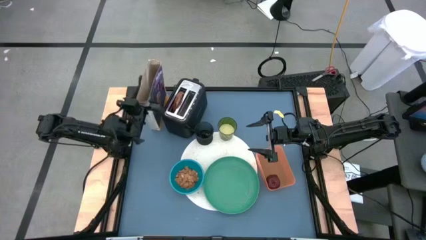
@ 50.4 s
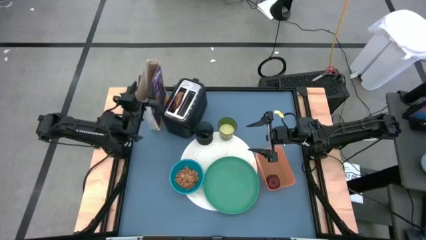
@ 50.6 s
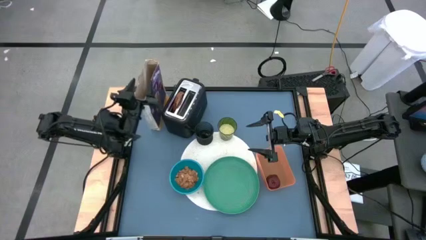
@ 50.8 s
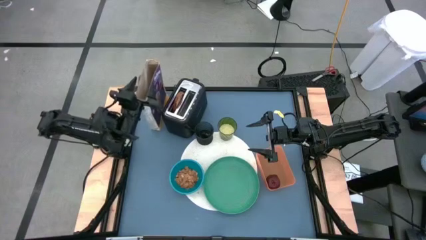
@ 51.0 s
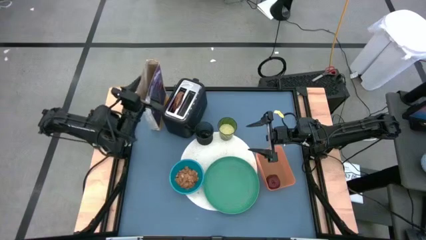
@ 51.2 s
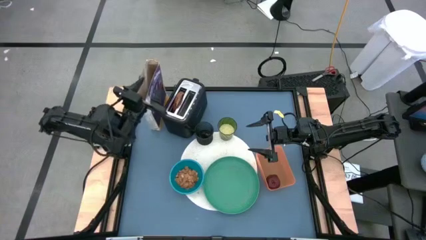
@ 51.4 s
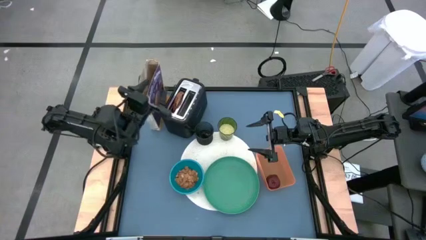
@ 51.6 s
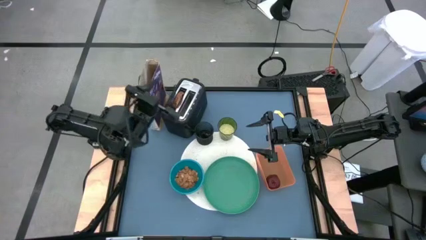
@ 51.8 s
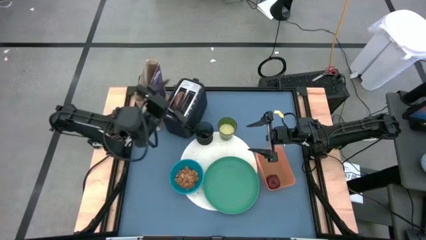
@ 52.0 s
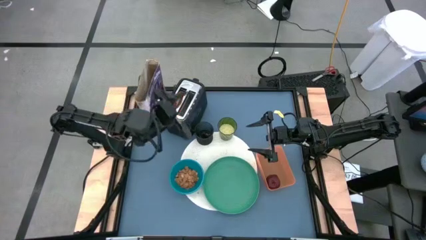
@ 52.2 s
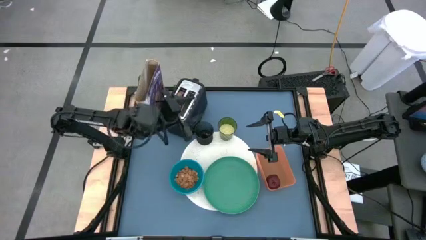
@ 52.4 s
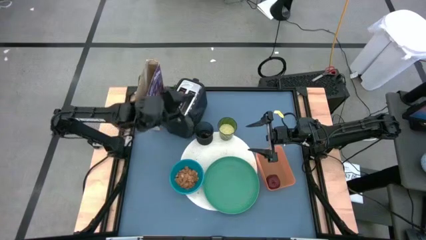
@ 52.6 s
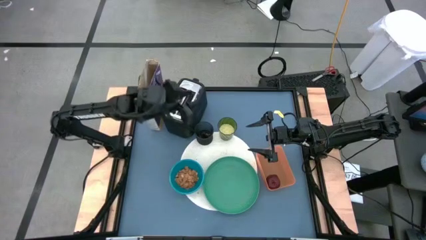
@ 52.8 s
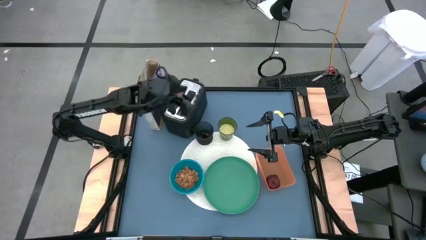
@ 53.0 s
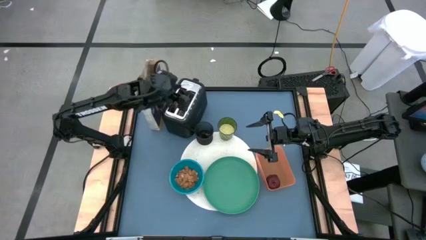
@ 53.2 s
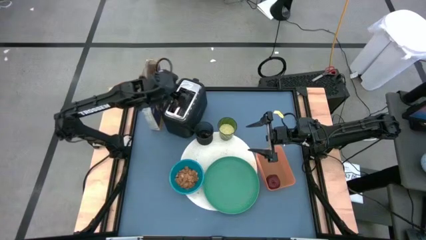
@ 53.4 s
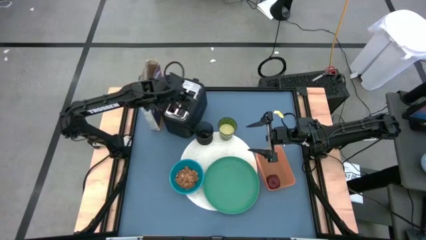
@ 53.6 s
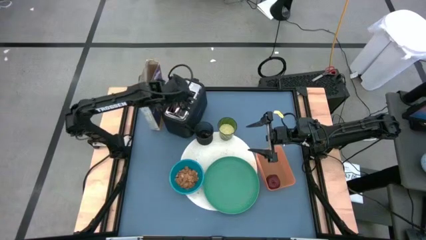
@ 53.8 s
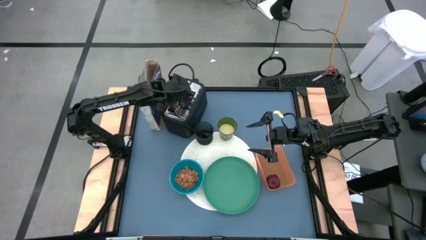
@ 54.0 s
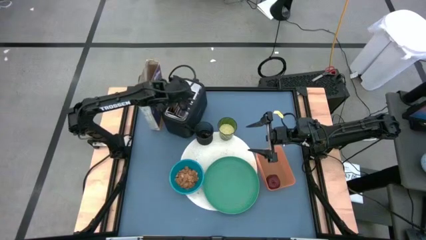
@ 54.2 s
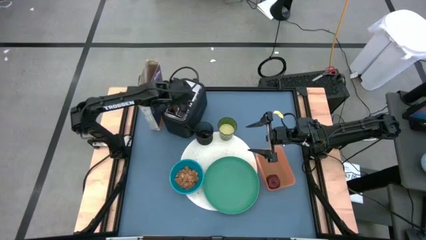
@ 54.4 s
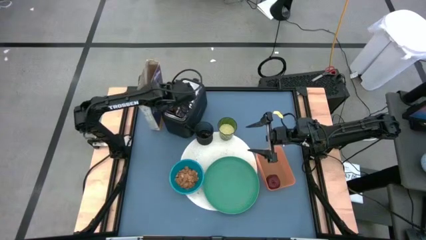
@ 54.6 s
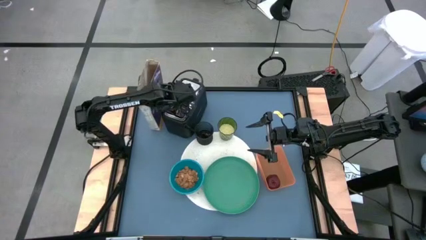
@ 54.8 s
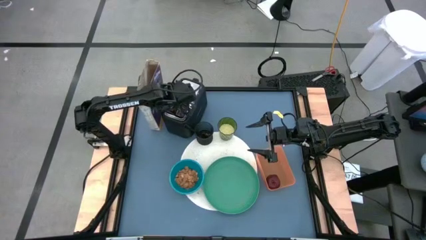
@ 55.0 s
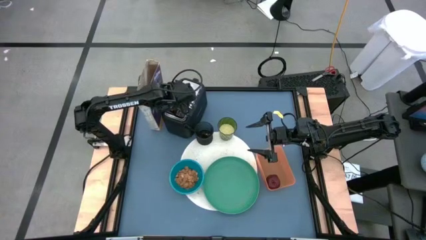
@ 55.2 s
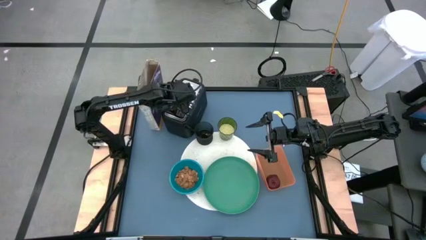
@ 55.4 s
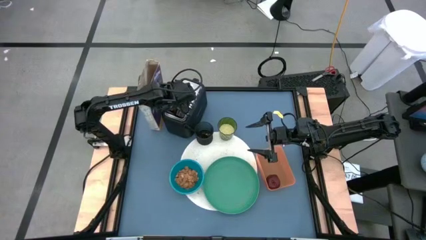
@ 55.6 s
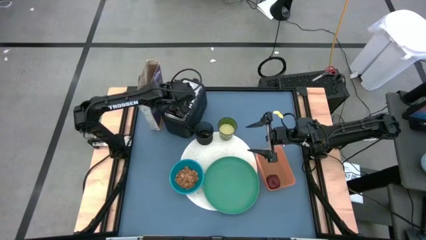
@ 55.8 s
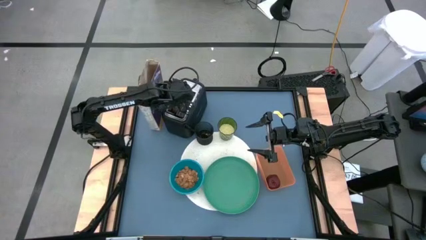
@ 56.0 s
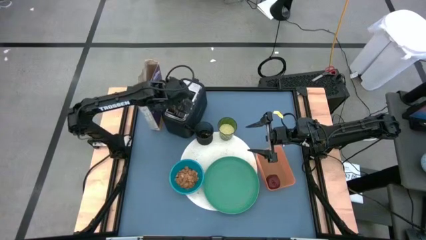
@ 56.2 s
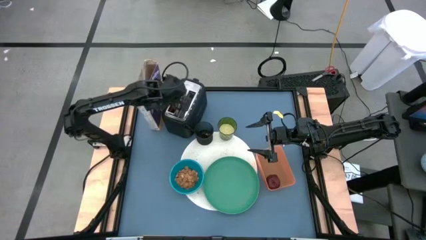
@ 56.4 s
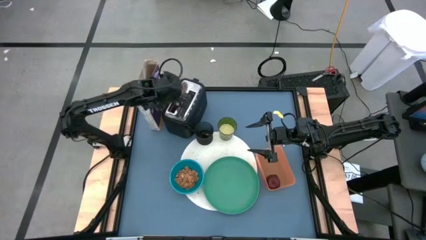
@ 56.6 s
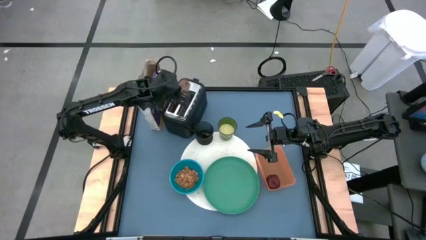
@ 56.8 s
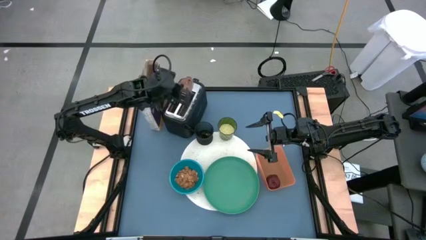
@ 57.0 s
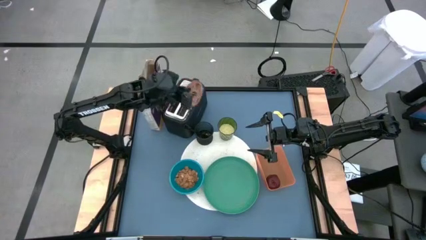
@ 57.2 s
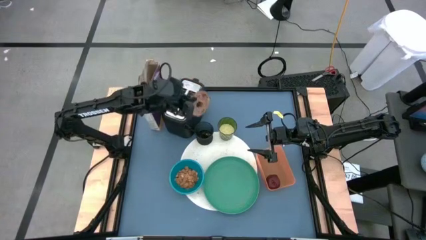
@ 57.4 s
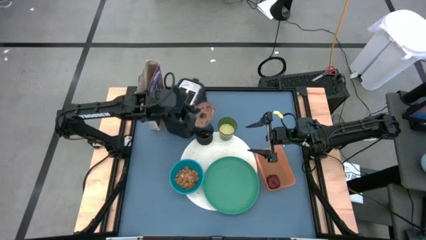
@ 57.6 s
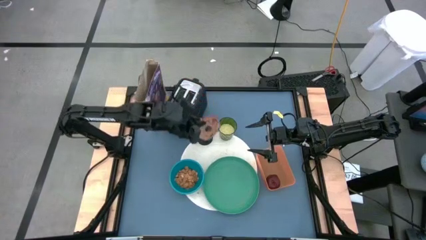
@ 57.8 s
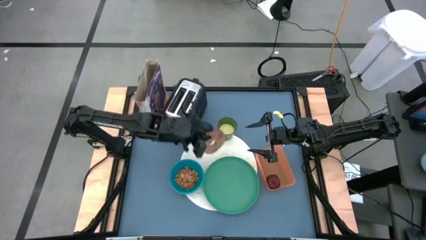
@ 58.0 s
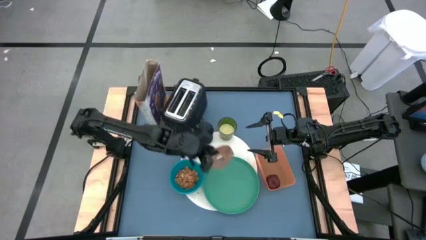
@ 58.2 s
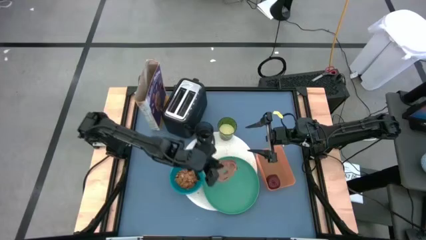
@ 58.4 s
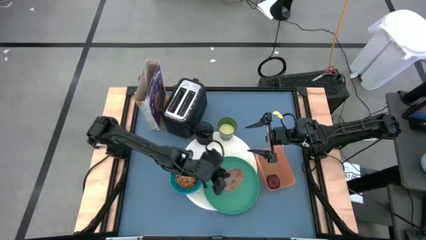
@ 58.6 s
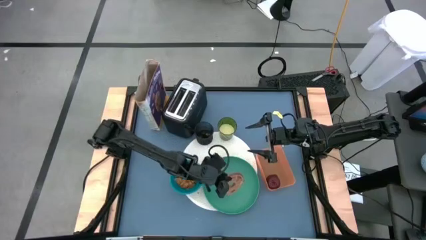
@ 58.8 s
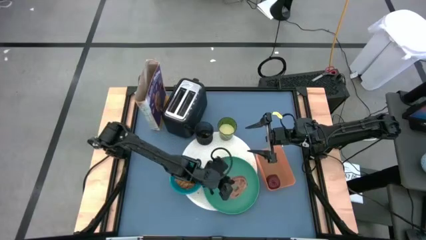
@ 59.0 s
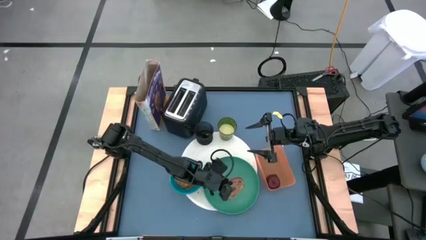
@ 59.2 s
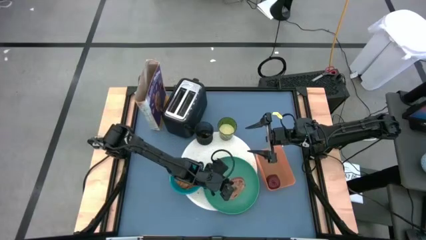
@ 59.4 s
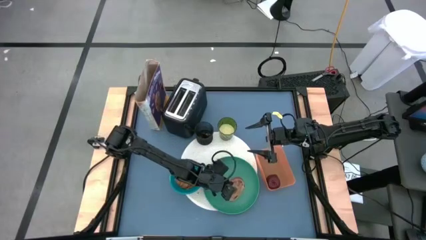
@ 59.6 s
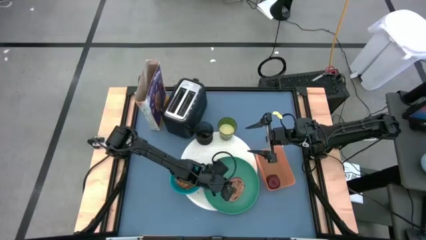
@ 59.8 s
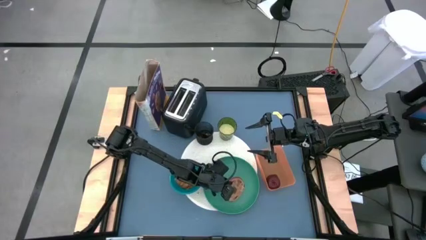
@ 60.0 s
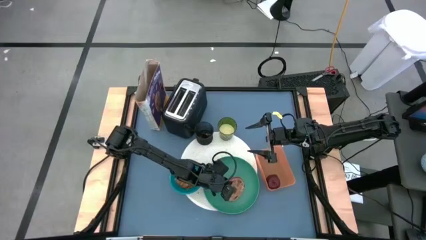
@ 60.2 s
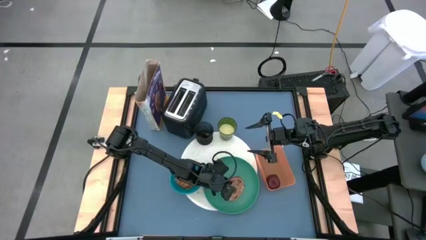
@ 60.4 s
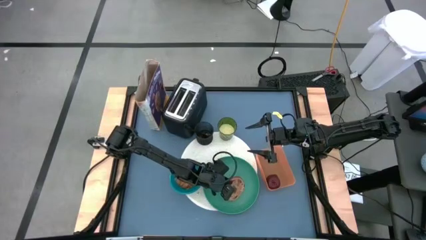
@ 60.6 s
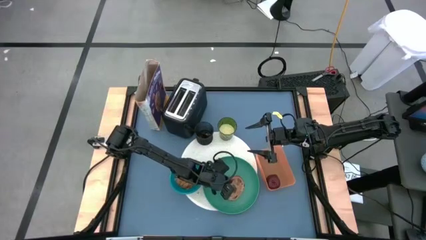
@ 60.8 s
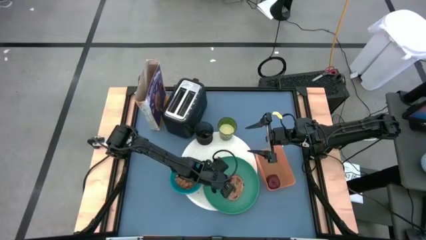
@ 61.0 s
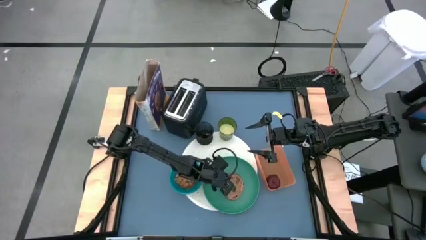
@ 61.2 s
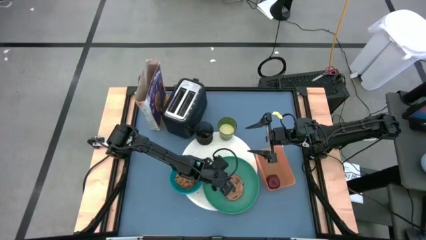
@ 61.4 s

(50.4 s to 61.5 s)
Task: Arrange a breakfast setting
Put the brown toasted bread on the green plate
